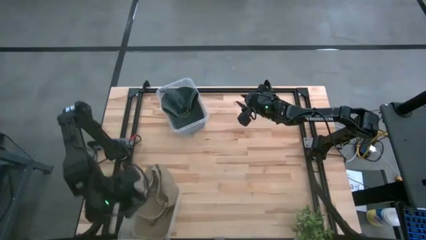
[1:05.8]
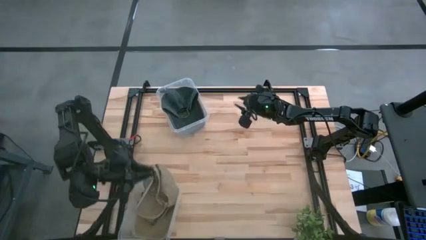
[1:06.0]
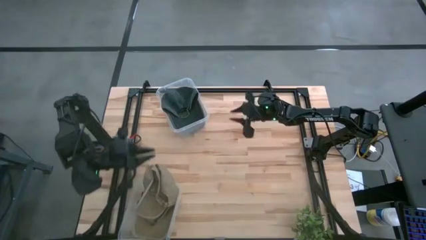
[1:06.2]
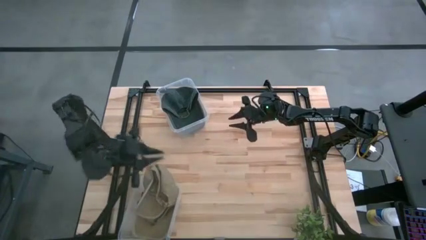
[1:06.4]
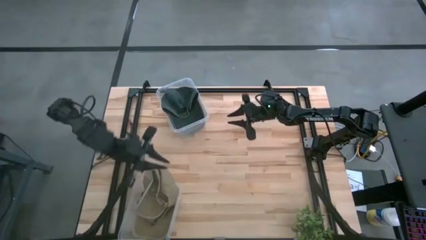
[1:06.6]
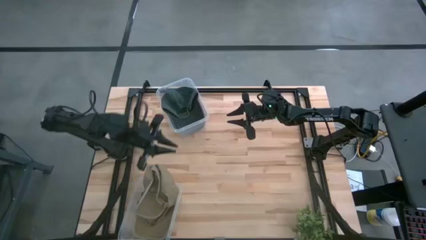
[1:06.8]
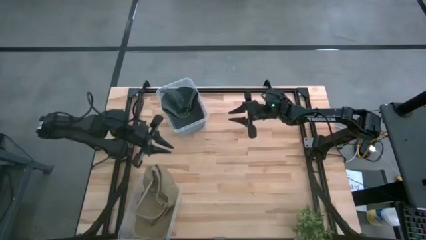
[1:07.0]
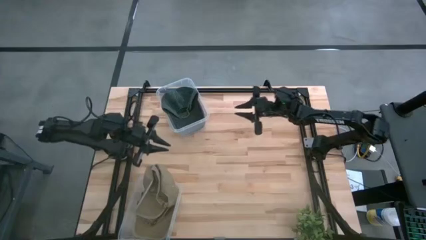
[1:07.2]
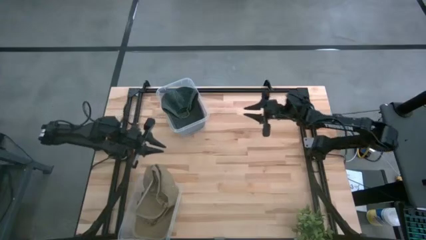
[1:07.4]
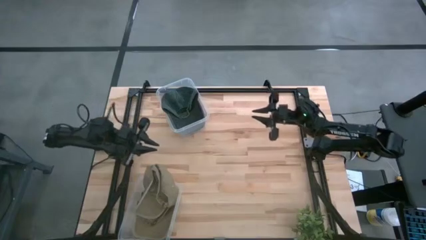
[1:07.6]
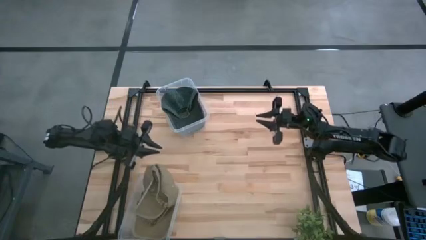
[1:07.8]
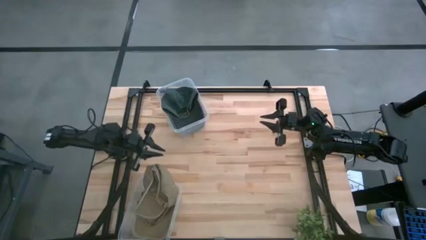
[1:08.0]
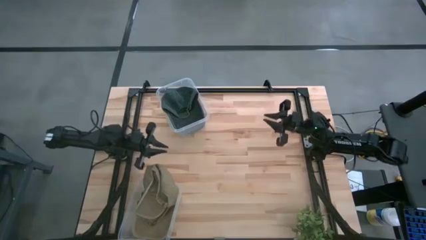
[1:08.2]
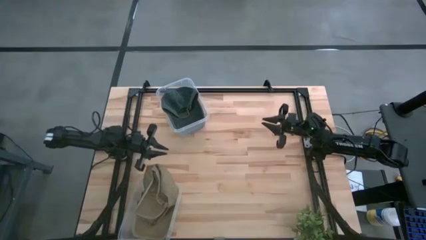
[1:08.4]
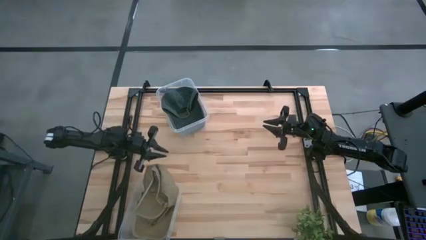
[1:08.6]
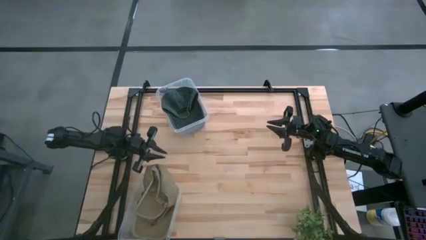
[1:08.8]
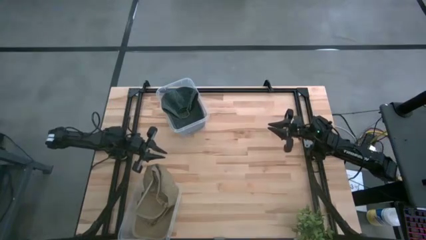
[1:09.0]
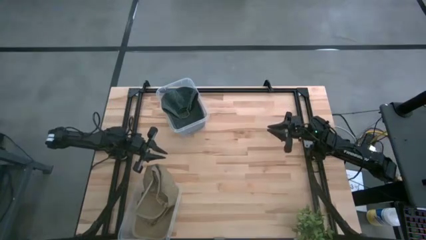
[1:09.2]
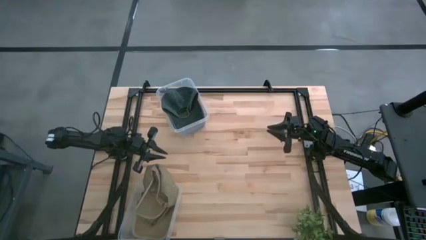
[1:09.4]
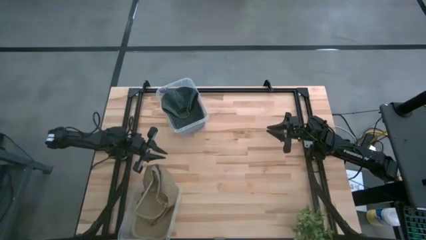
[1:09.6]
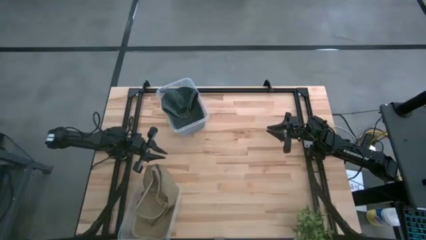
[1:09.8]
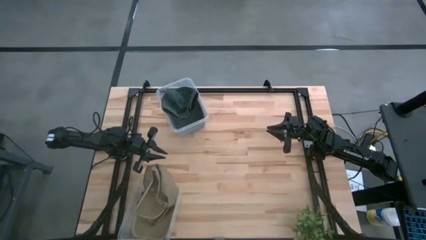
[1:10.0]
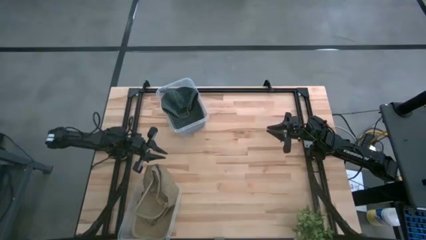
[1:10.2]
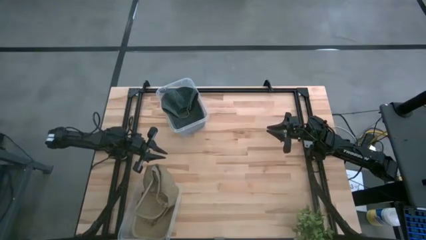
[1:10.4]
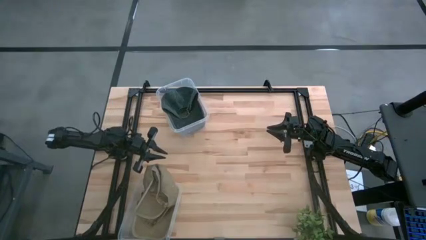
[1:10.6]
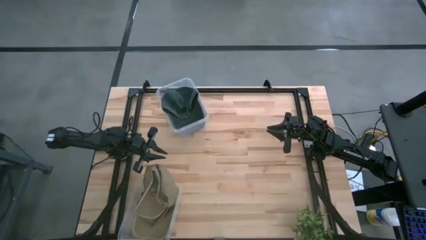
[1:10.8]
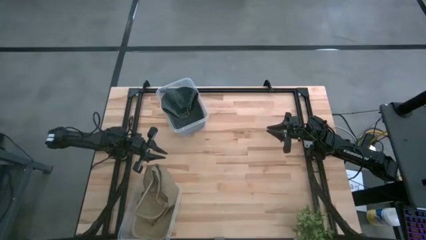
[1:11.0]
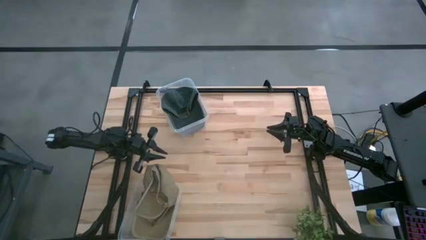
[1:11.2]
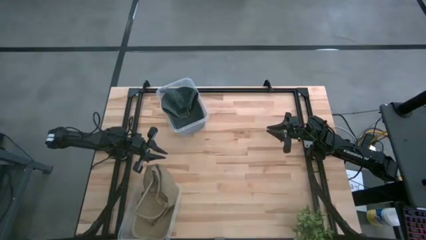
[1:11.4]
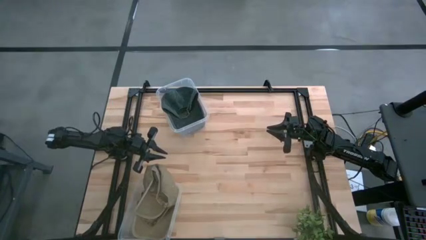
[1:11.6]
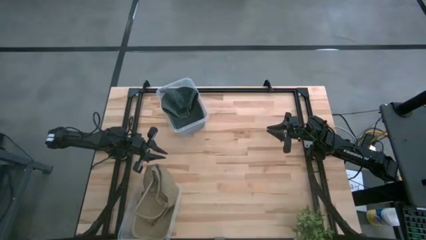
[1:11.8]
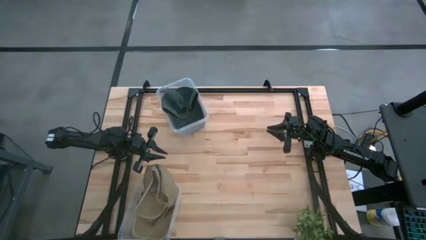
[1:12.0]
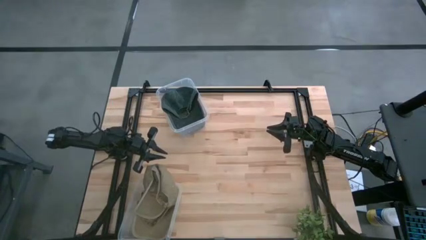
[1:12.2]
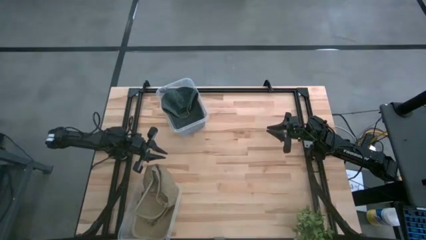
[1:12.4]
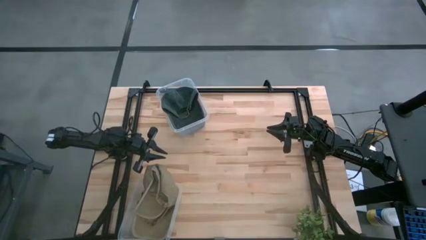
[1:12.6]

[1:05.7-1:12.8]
Task: Pick & Place hat
Return to Home Position

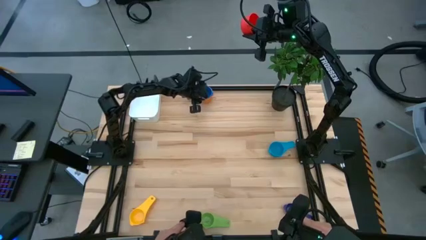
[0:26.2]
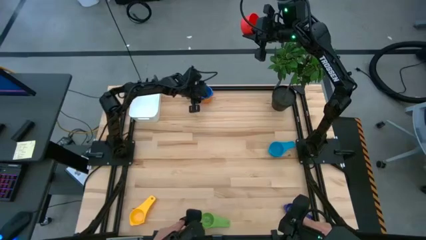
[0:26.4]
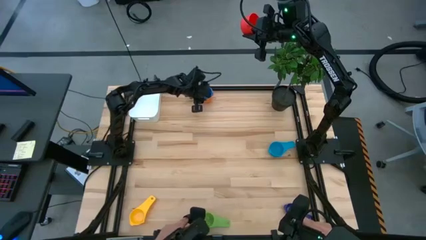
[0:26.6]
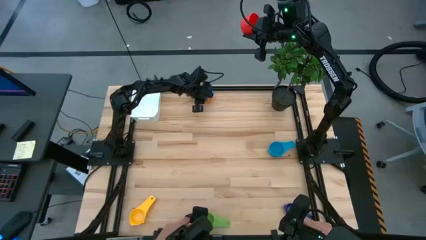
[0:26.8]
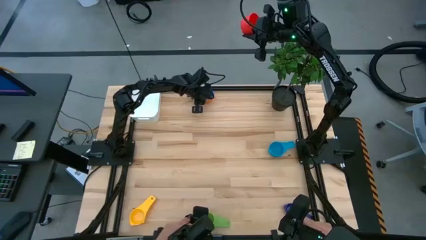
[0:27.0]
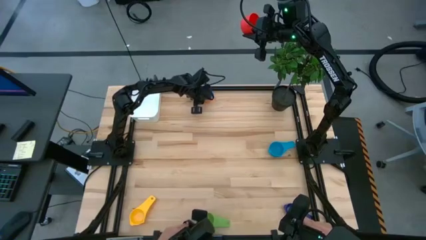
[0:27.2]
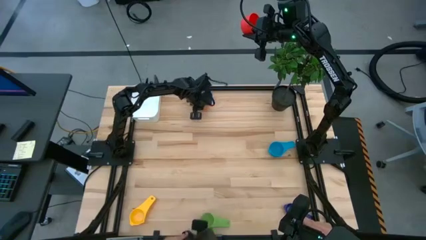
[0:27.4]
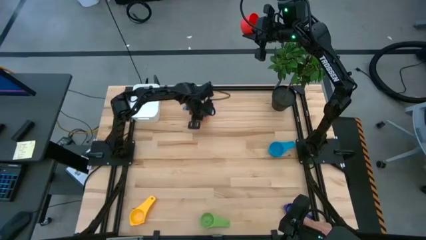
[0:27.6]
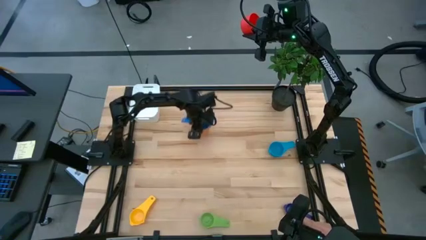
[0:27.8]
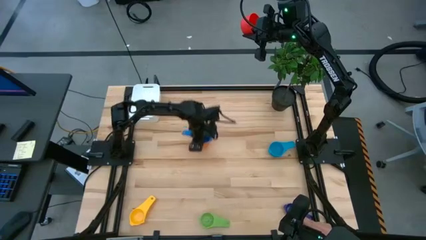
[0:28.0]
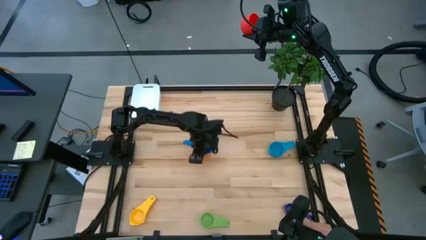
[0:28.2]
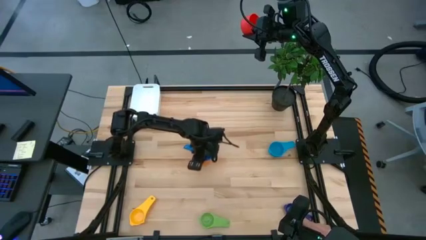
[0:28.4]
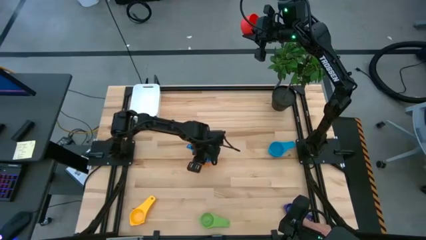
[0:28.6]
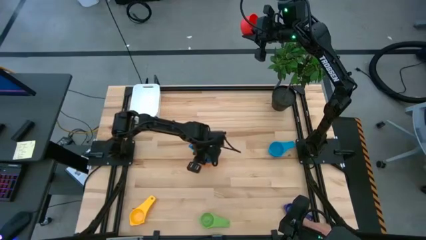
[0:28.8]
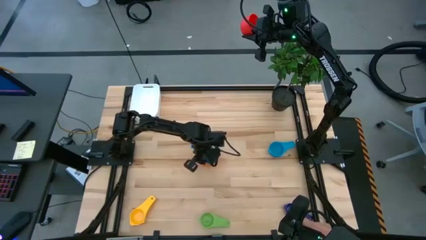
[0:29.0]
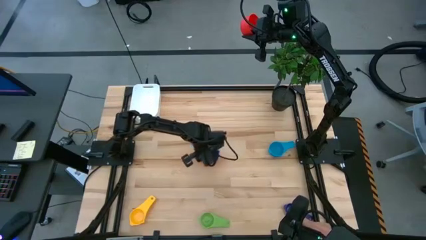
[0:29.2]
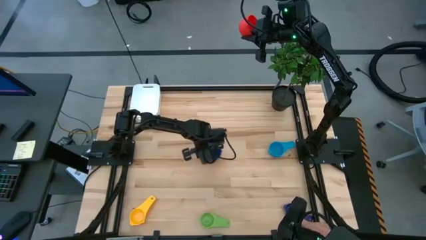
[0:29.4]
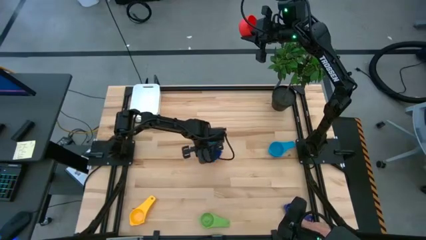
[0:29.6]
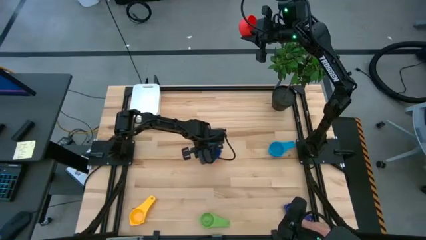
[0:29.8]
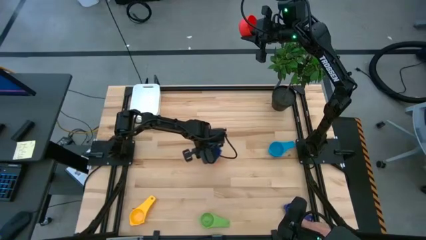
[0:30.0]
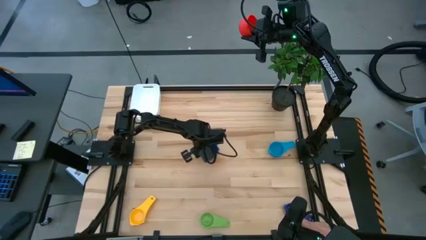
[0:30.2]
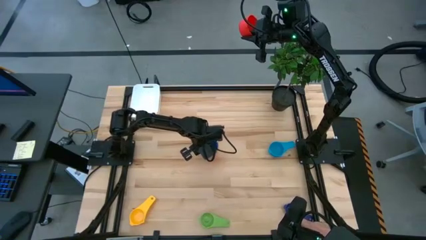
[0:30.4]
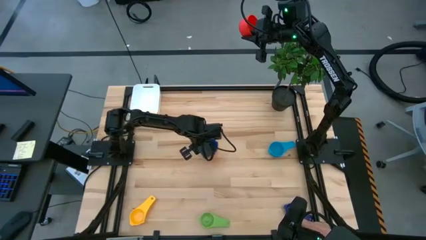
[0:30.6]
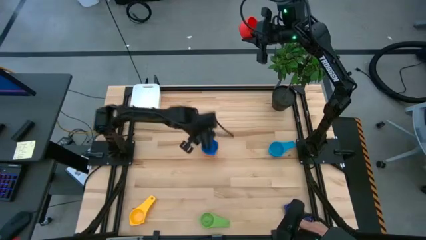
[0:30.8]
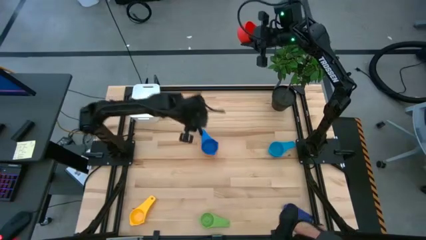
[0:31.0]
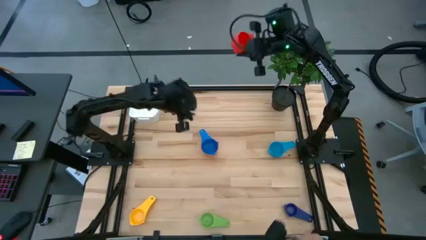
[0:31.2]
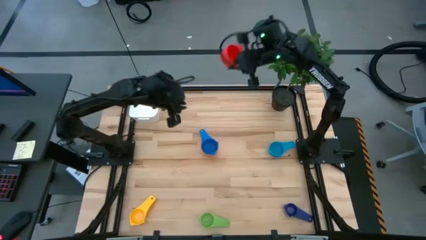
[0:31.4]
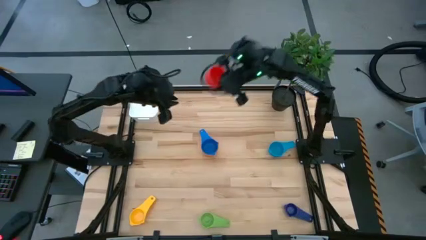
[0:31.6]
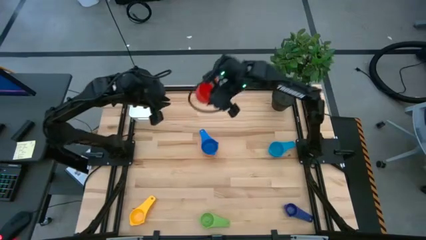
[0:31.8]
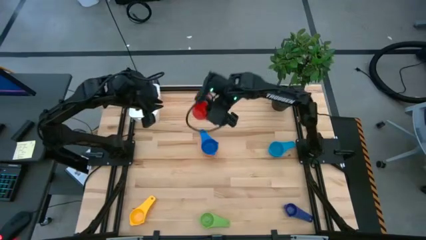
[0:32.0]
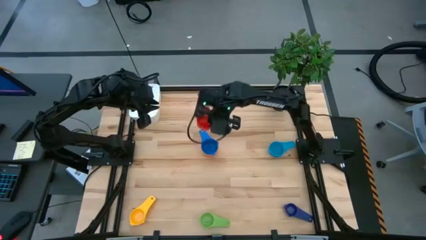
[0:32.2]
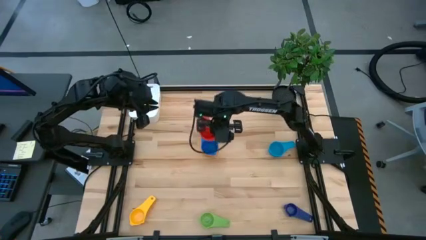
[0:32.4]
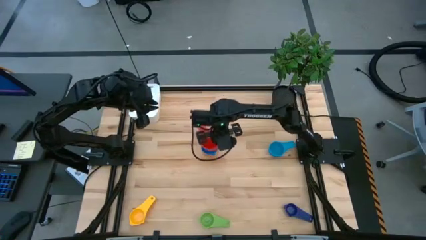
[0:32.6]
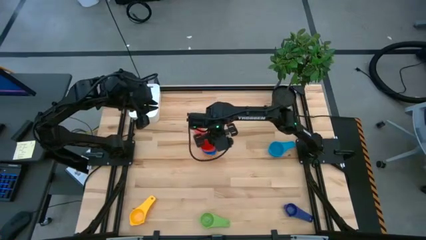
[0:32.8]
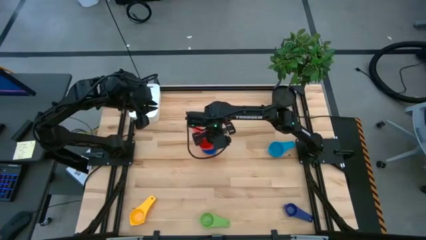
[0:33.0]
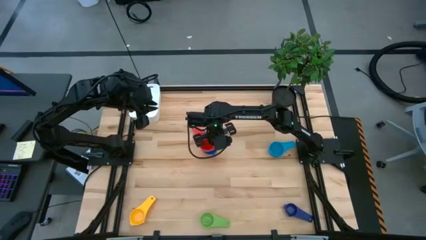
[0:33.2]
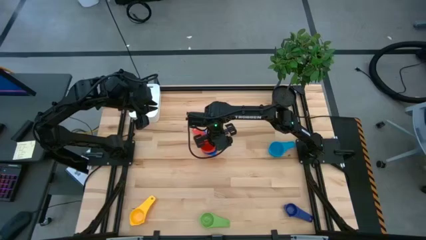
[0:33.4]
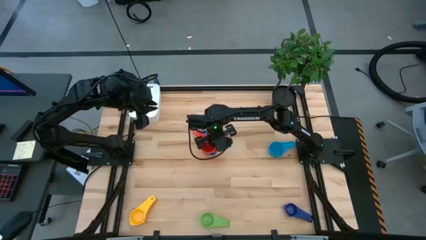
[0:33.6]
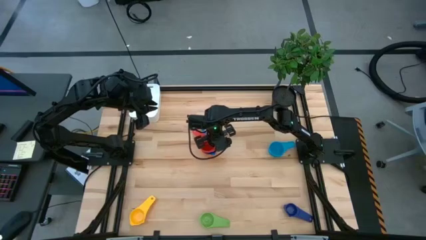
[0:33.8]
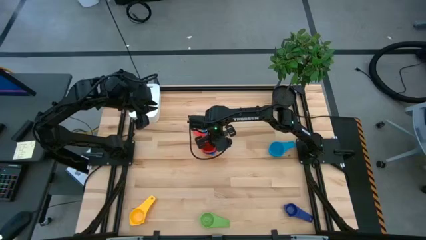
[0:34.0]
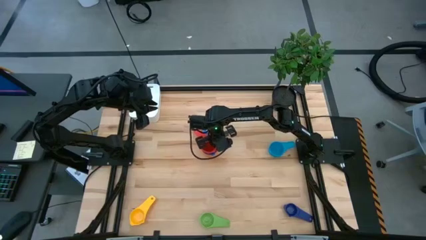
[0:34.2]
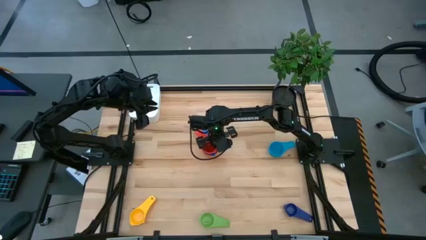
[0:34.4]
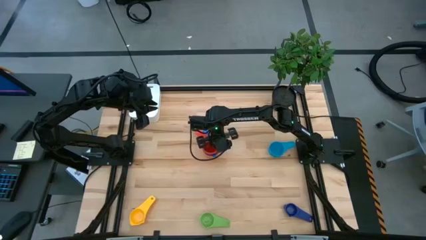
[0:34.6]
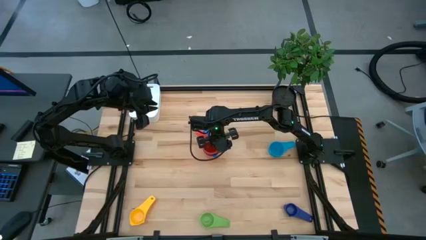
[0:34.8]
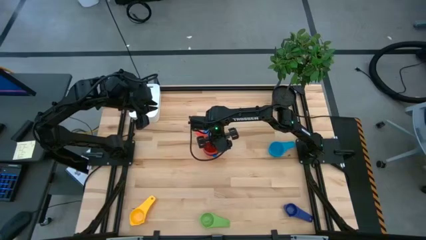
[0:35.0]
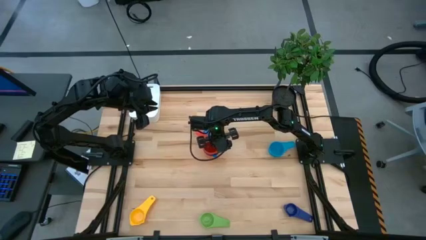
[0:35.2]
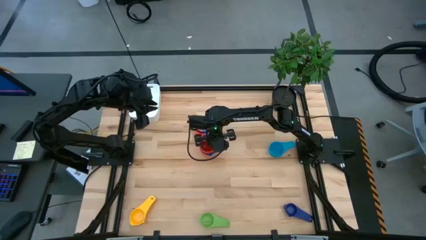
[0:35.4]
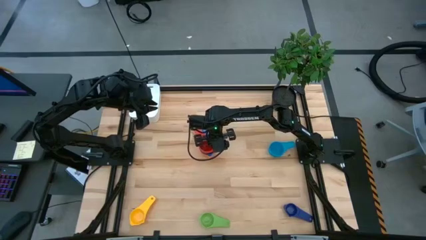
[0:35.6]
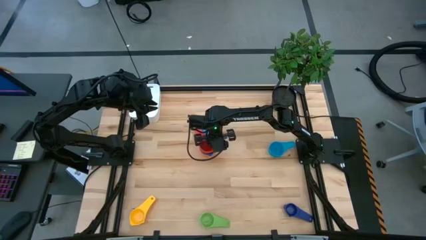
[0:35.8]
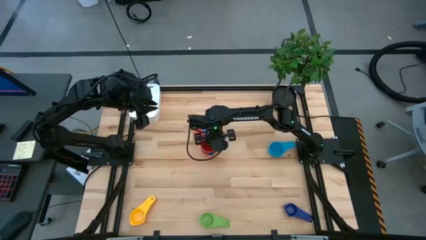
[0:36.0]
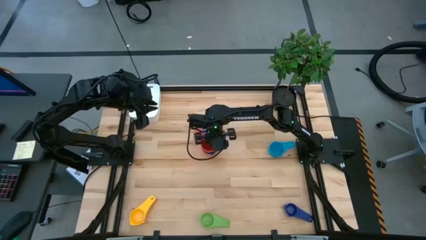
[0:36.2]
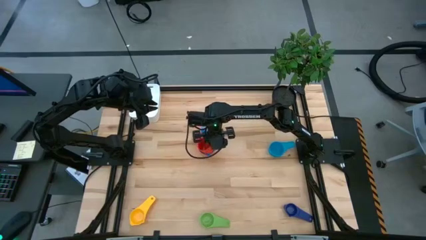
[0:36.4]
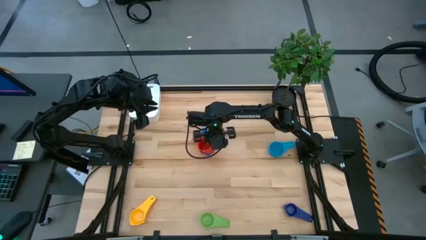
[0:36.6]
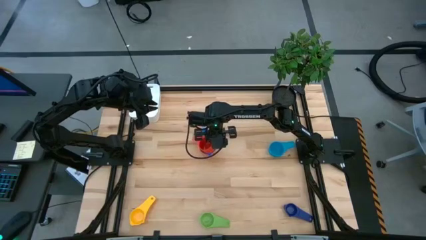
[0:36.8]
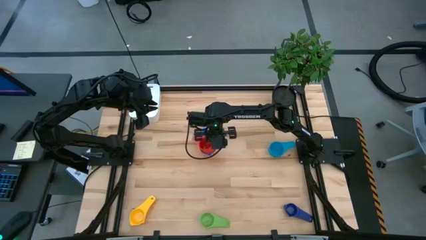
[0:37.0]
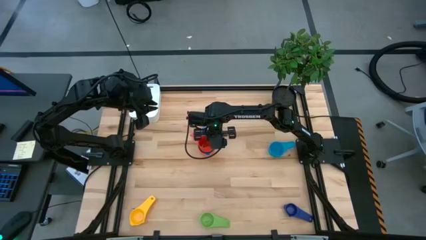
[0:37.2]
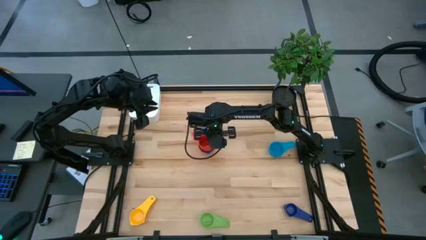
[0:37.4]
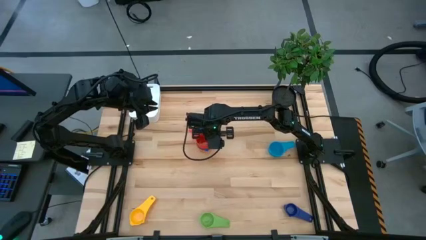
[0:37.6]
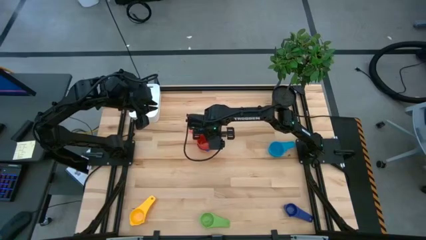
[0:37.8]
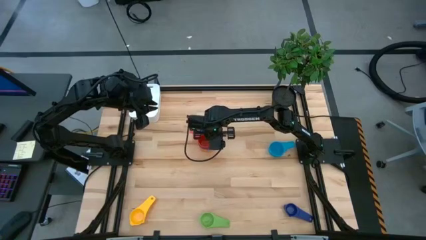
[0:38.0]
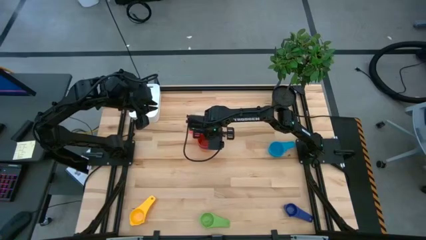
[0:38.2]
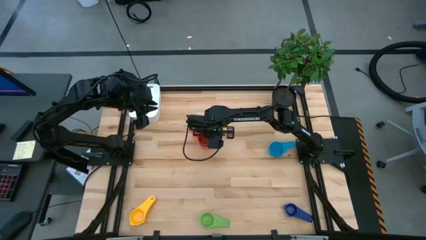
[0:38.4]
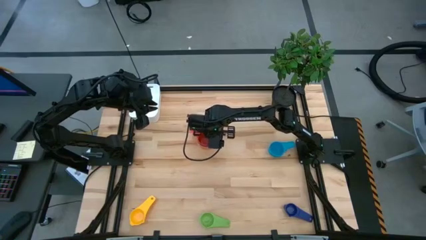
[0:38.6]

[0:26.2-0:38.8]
Task: Nest measuring cups in basket
Stack the red measuring cup on top of the blue measuring cup
